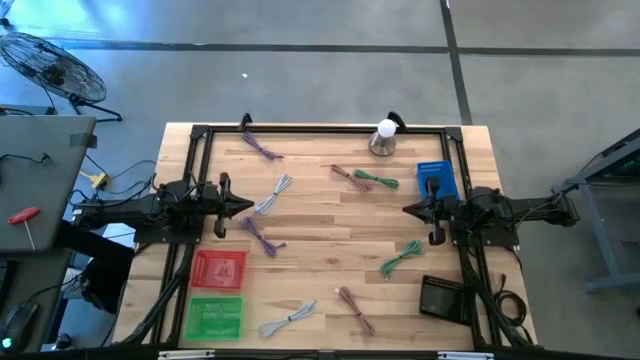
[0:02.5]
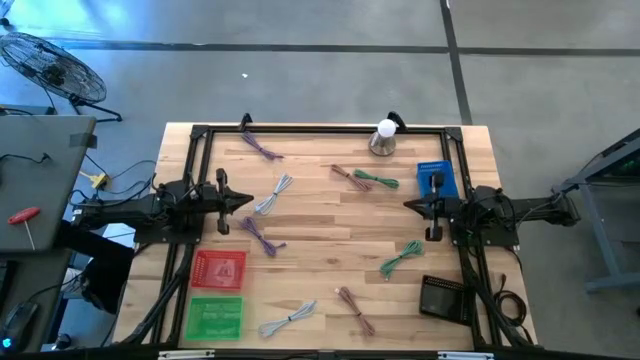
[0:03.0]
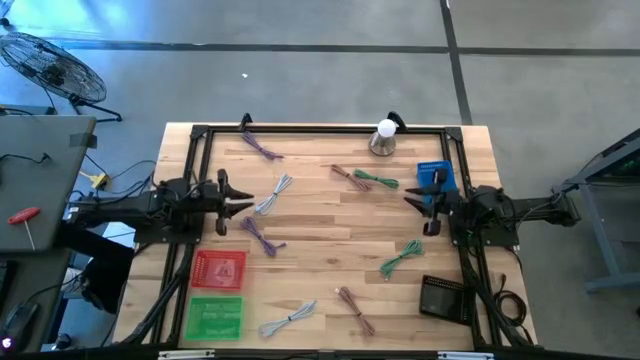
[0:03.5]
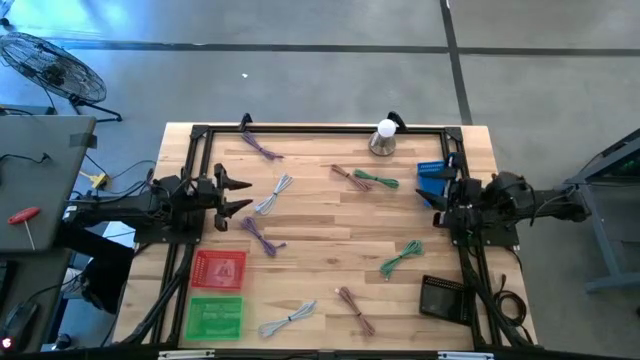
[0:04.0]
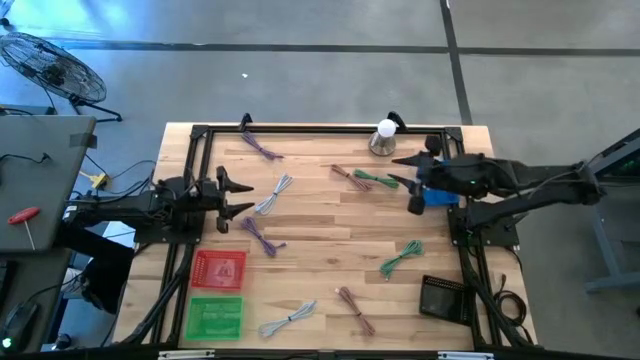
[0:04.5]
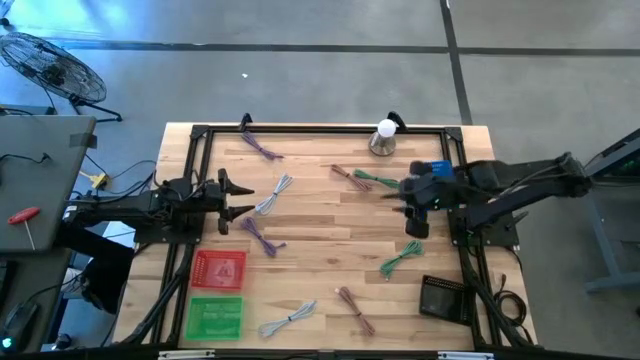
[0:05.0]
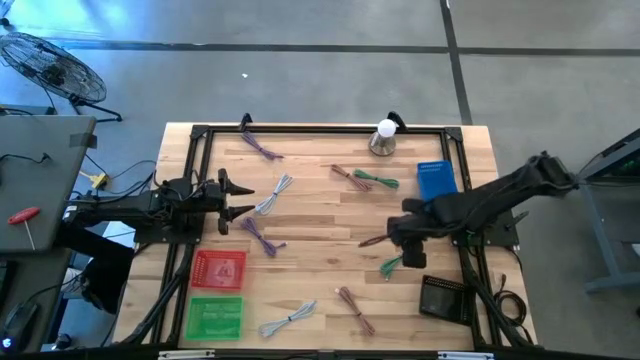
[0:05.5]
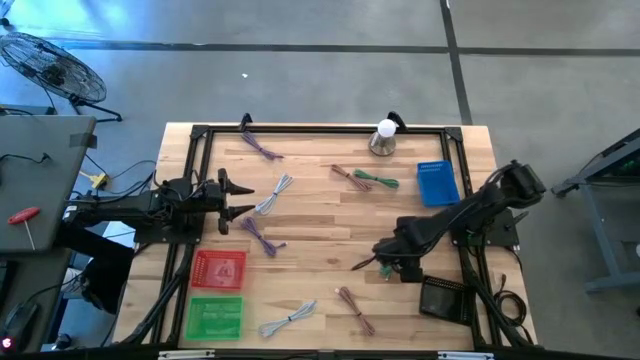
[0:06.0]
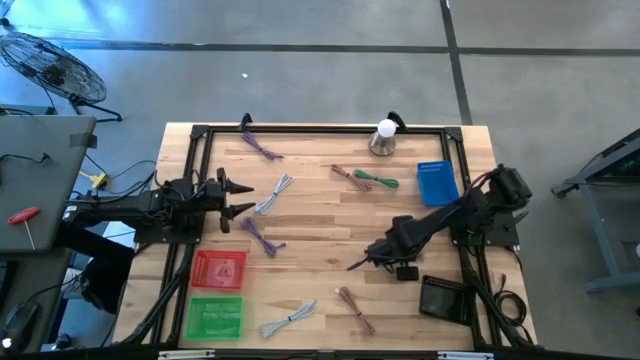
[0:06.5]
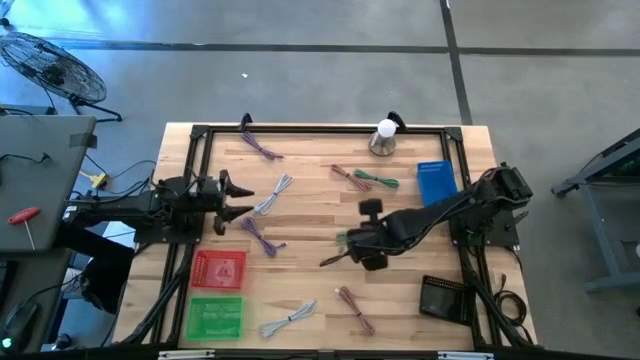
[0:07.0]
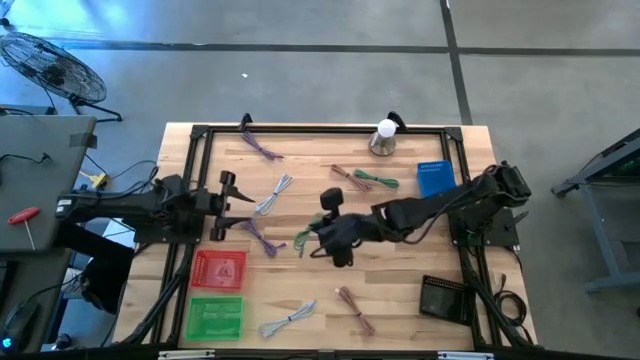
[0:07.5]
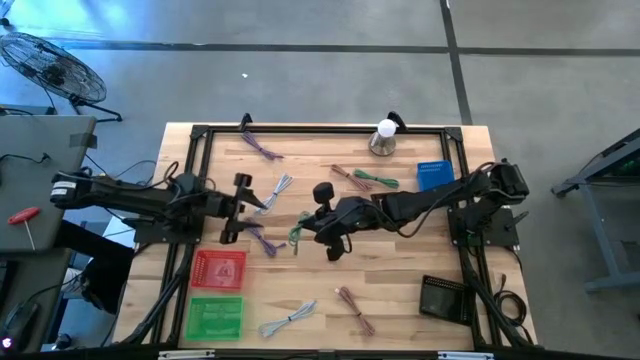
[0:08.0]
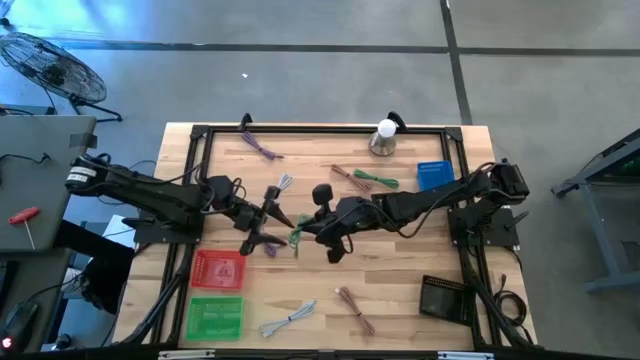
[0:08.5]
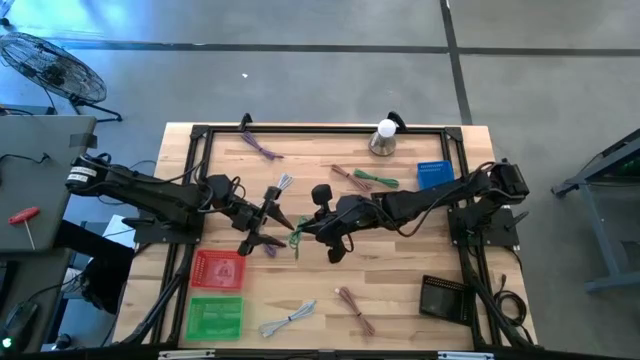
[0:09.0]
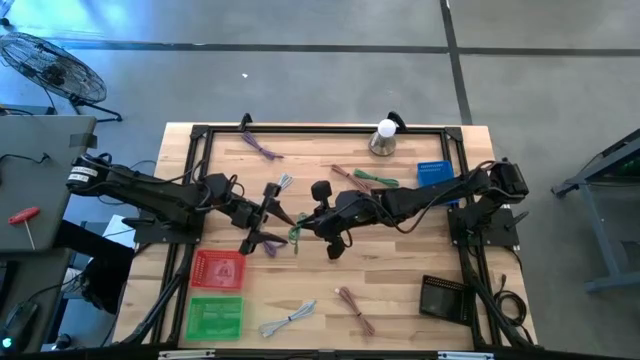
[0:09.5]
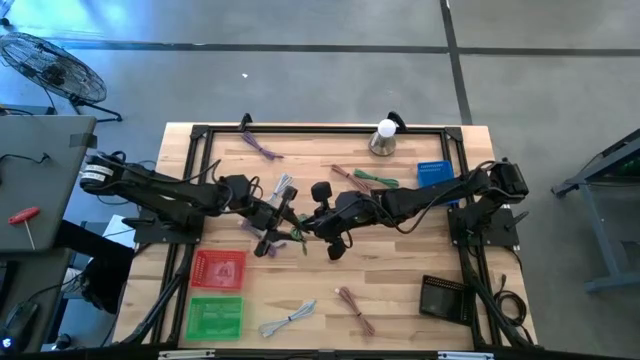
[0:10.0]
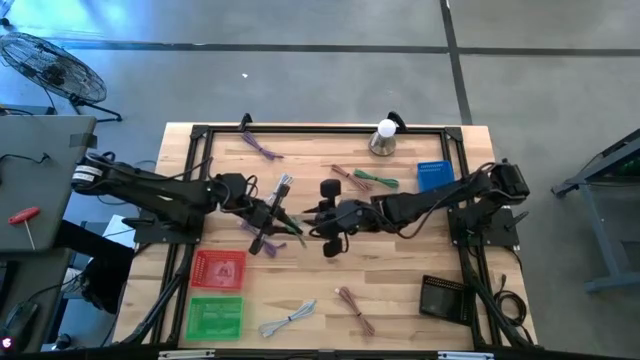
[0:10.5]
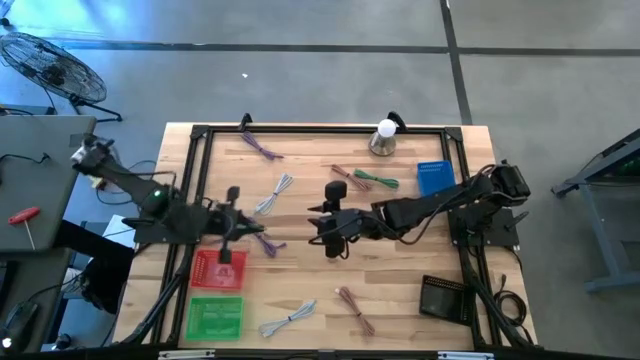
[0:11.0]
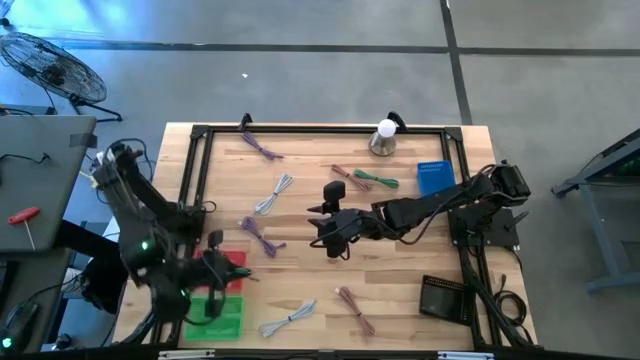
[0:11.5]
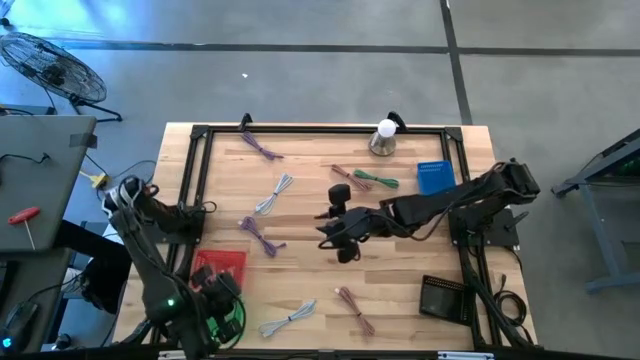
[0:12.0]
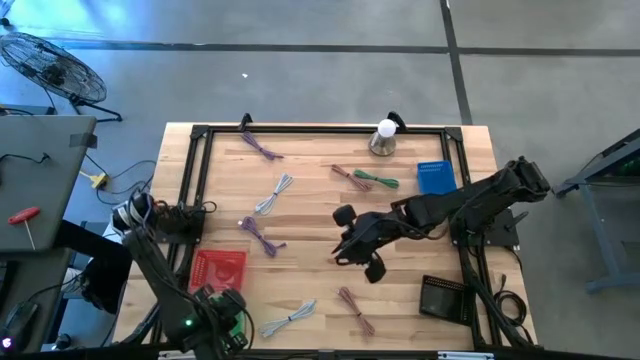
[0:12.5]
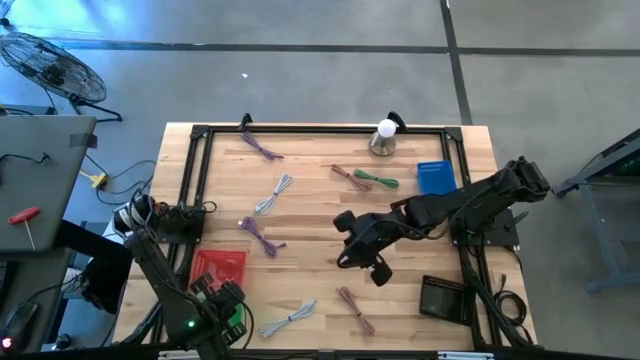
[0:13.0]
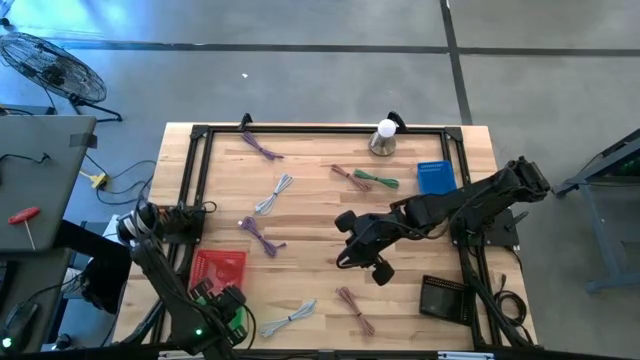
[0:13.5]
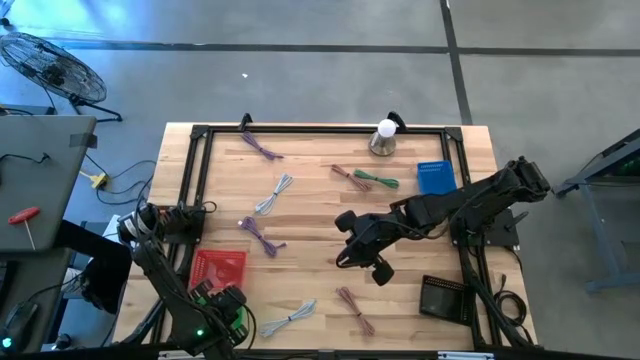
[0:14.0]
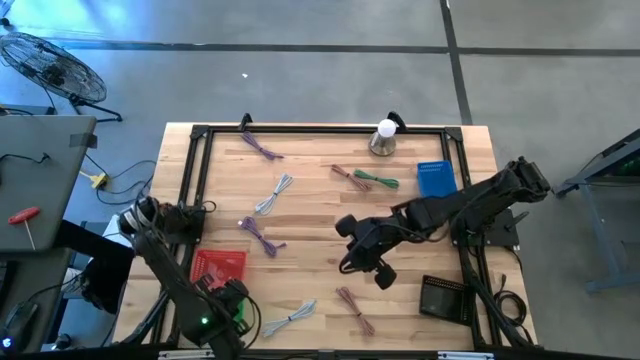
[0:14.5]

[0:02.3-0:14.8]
Task: Pick & Place USB Port
Put the bottom green charger cable into the green bin

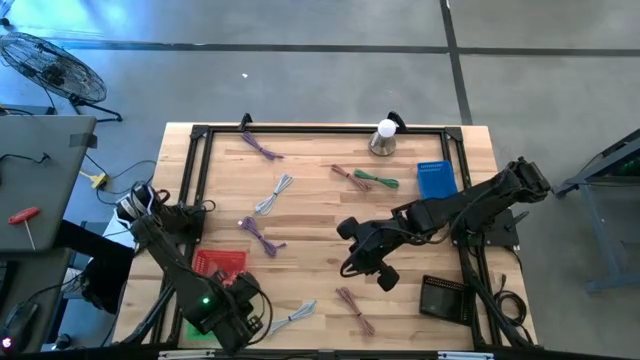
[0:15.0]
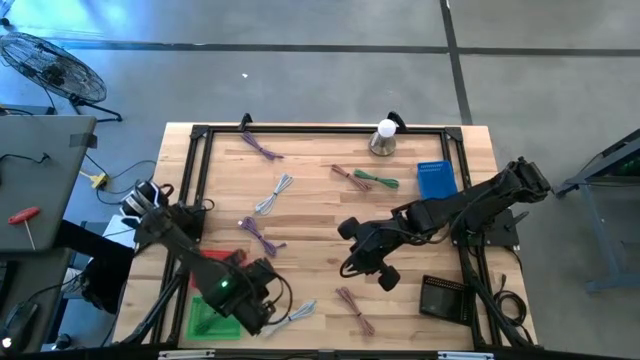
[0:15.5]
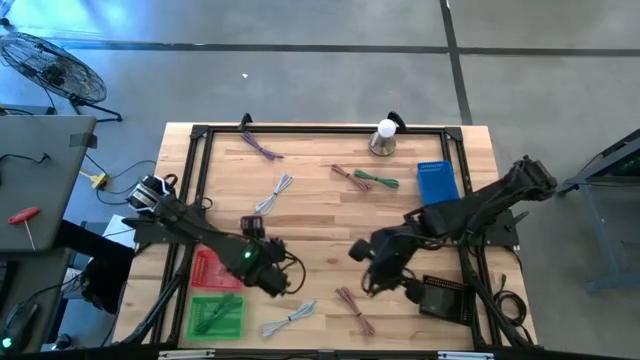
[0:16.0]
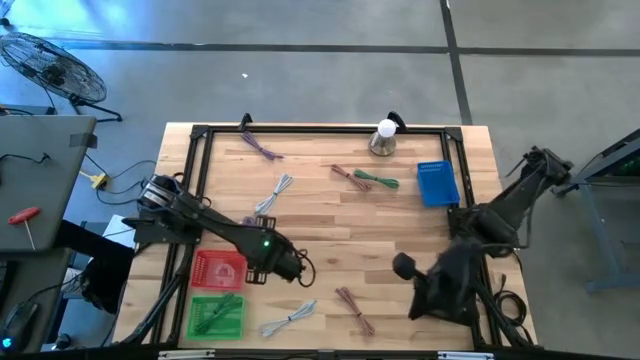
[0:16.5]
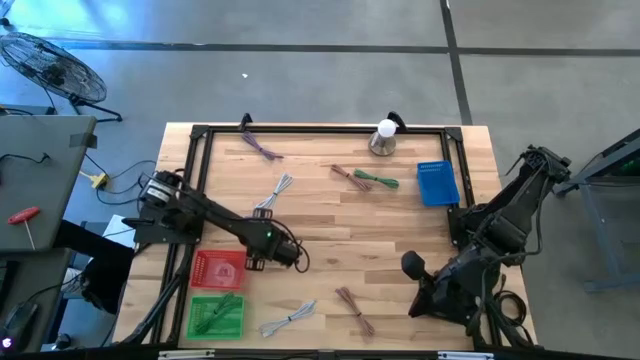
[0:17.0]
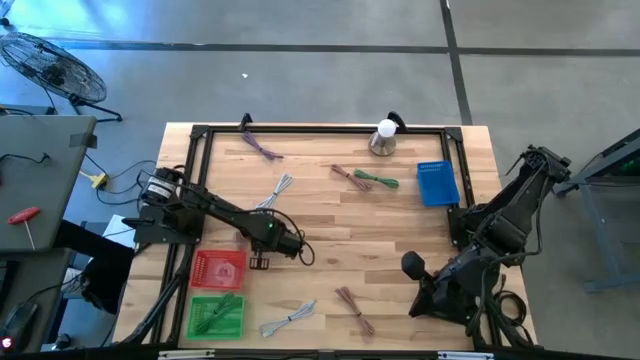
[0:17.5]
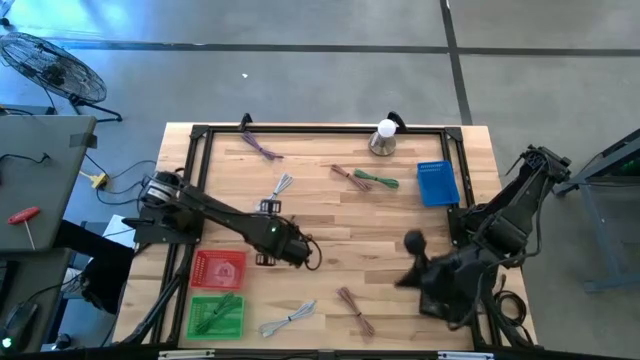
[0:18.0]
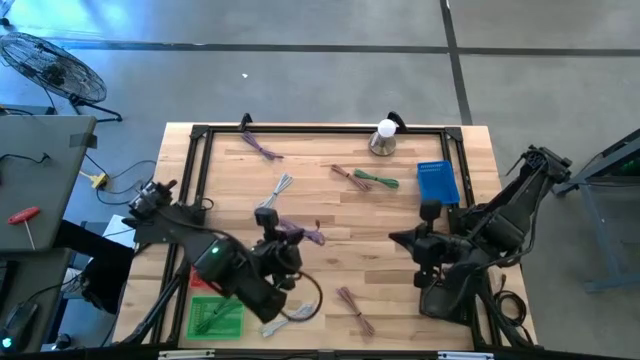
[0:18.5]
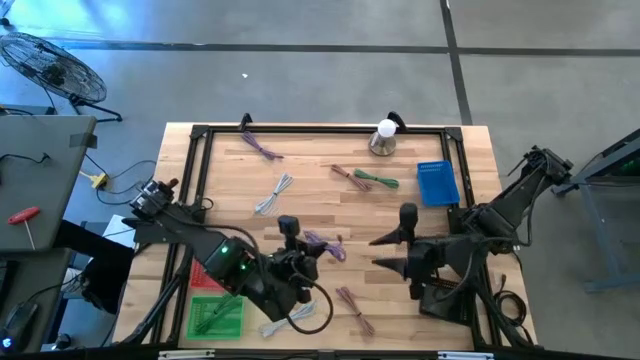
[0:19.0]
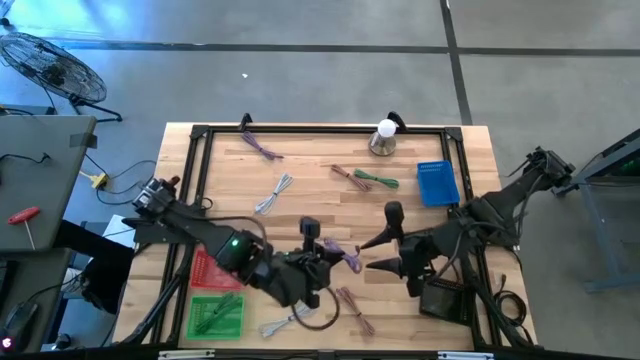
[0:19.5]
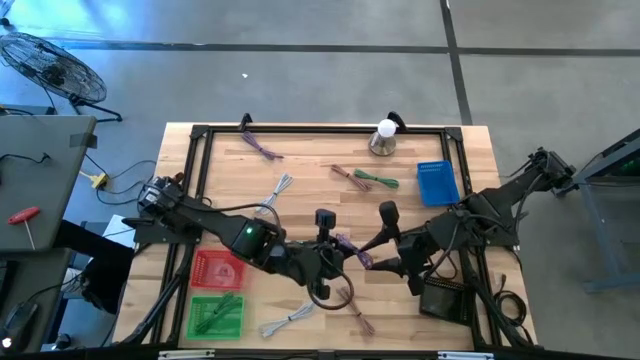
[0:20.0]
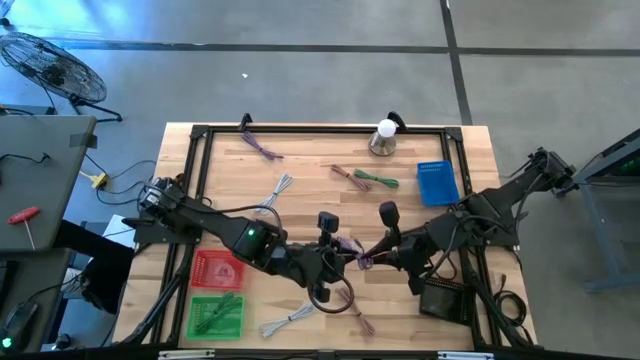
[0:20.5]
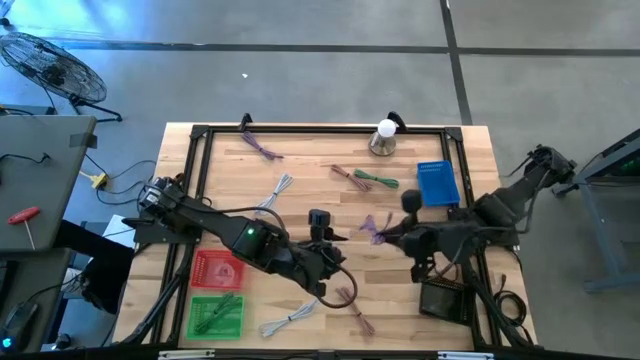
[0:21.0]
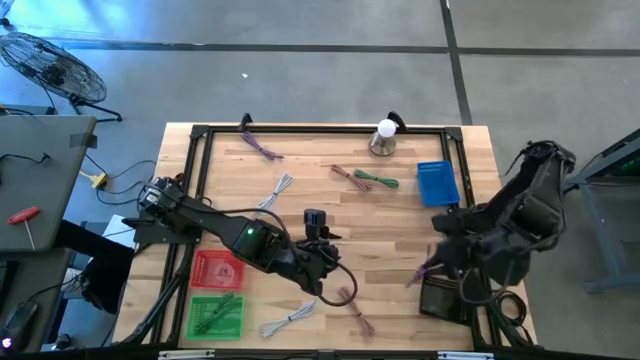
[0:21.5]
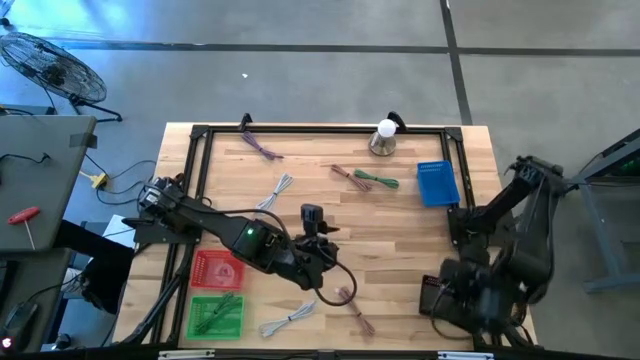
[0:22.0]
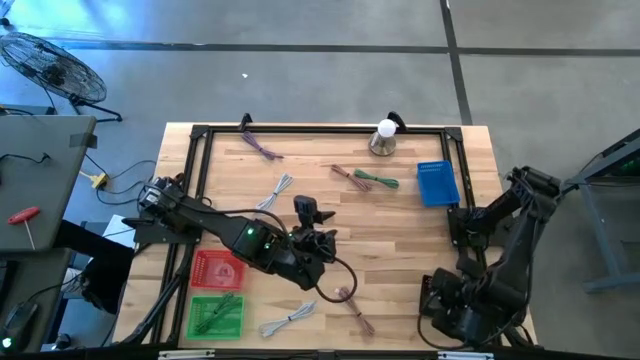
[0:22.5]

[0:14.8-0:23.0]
Put the bottom purple charger cable into the black bin

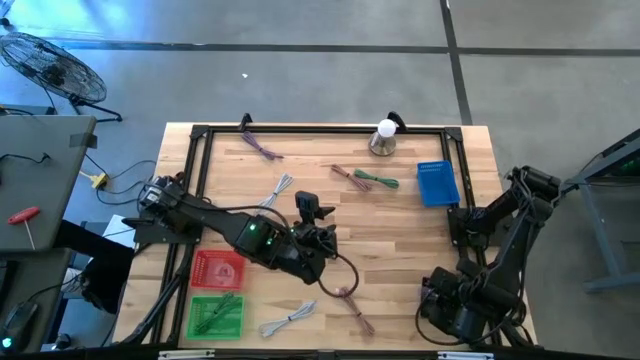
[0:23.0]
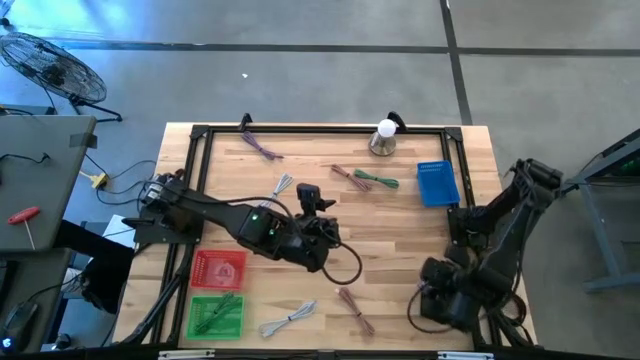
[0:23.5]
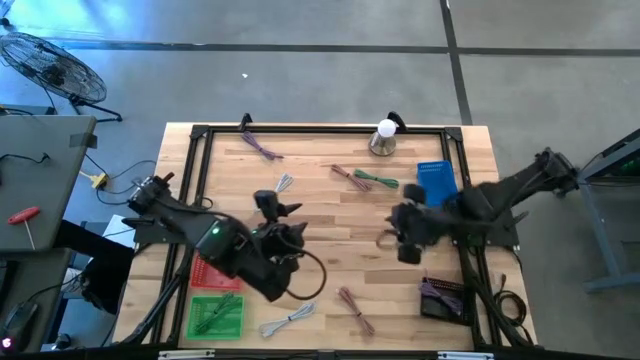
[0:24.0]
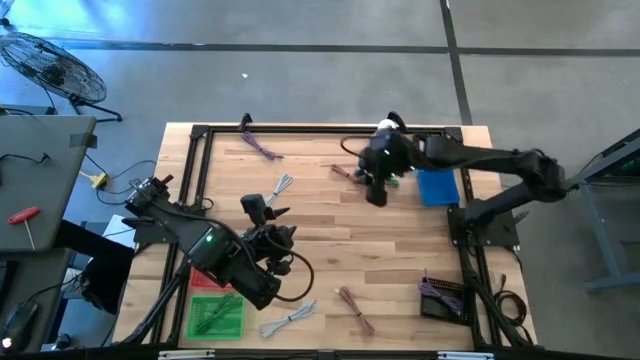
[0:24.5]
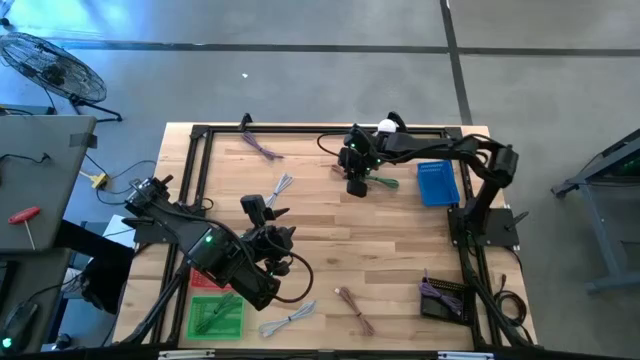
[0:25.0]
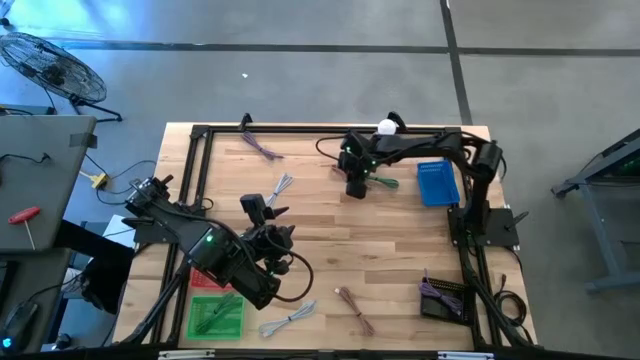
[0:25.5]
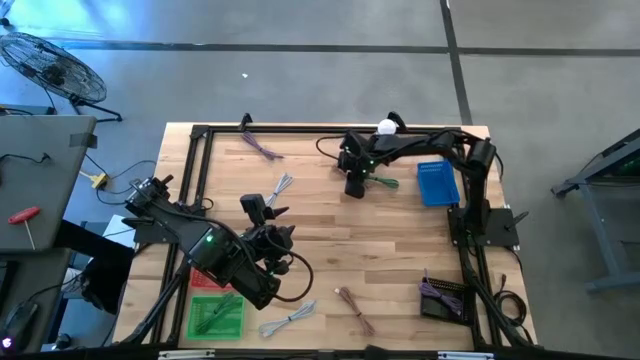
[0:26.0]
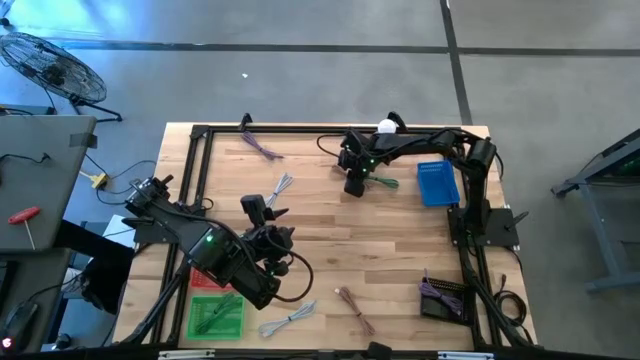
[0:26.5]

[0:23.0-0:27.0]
Put the top pink charger cable into the red bin
